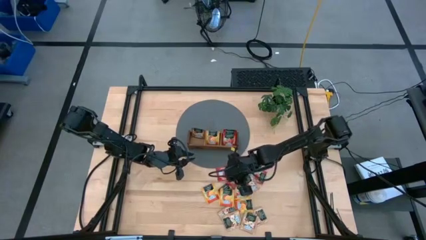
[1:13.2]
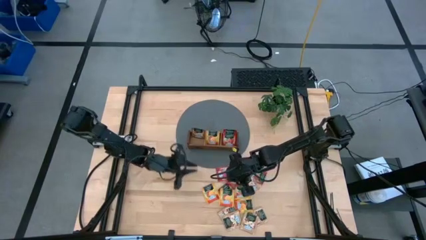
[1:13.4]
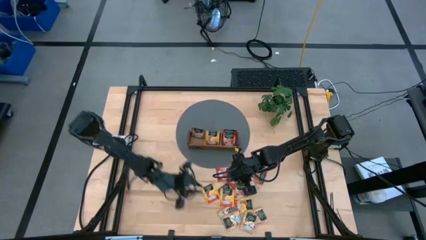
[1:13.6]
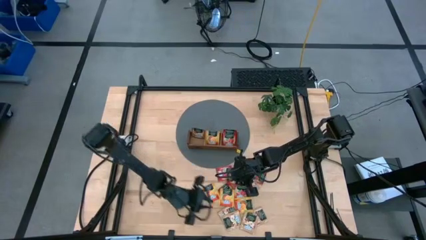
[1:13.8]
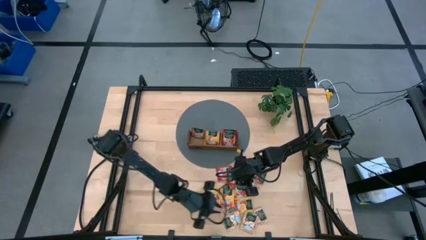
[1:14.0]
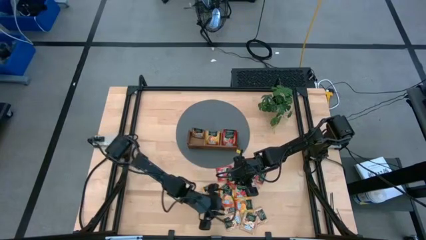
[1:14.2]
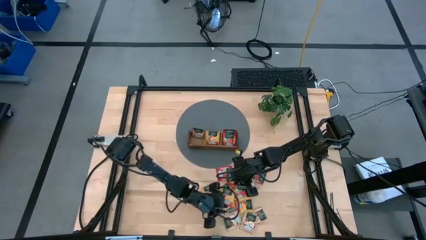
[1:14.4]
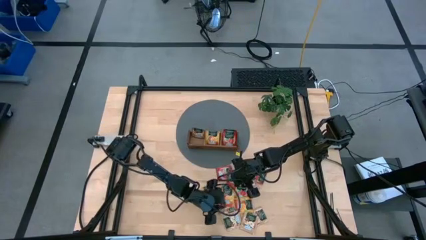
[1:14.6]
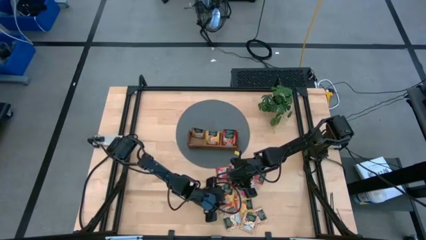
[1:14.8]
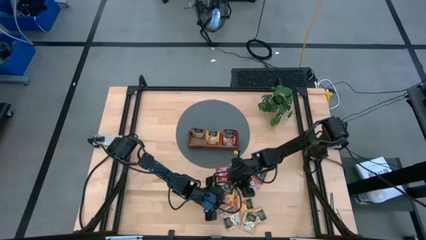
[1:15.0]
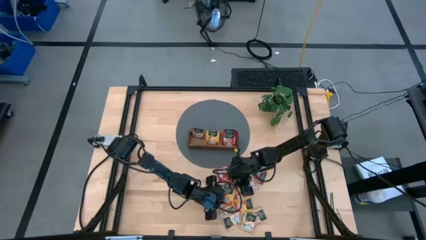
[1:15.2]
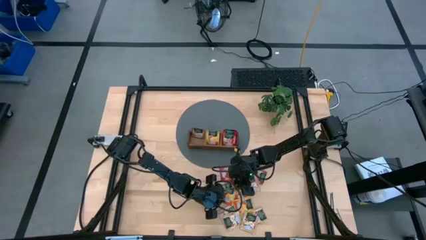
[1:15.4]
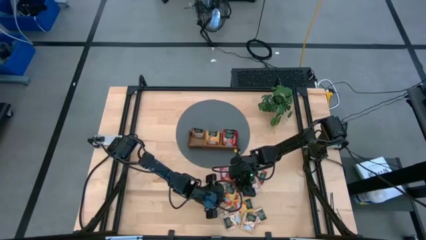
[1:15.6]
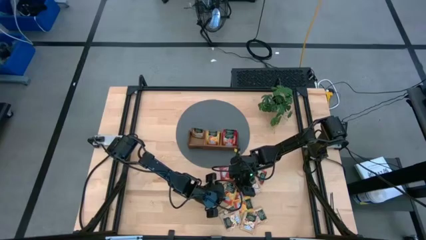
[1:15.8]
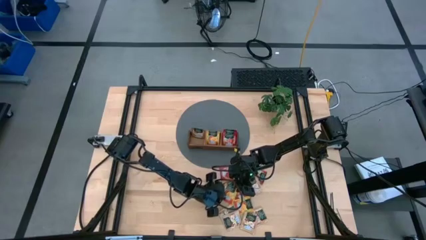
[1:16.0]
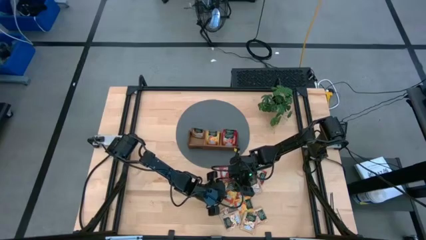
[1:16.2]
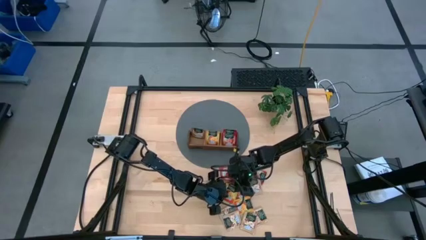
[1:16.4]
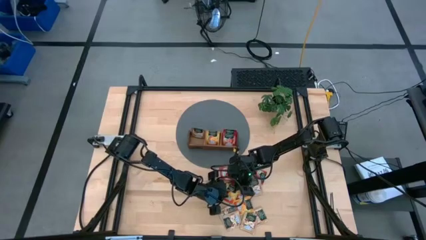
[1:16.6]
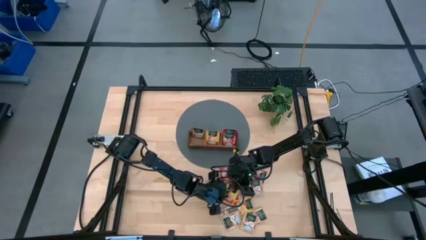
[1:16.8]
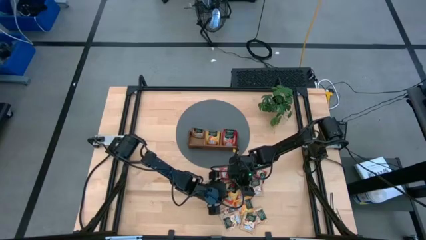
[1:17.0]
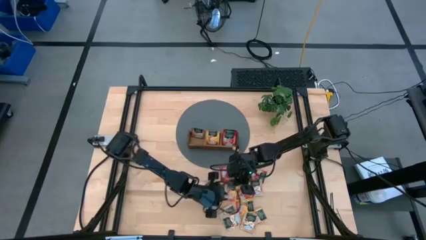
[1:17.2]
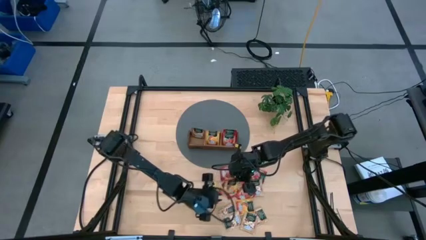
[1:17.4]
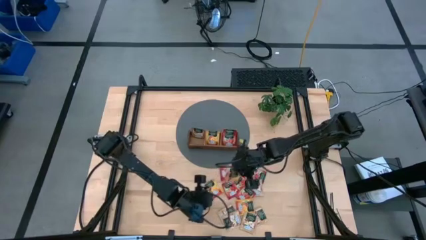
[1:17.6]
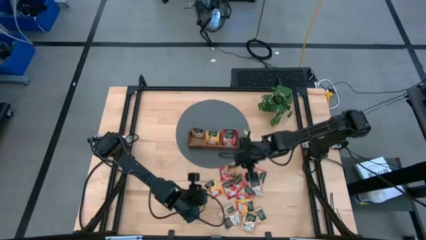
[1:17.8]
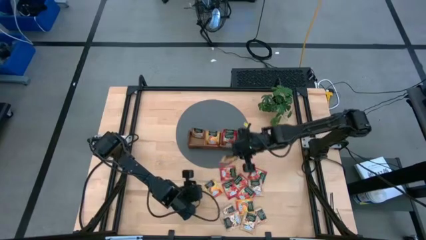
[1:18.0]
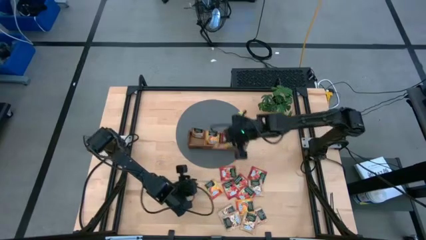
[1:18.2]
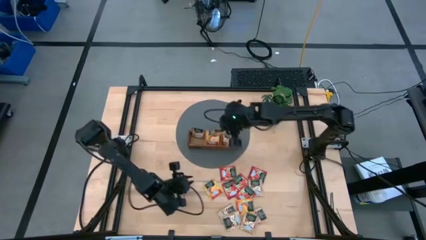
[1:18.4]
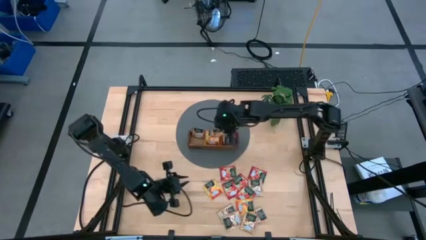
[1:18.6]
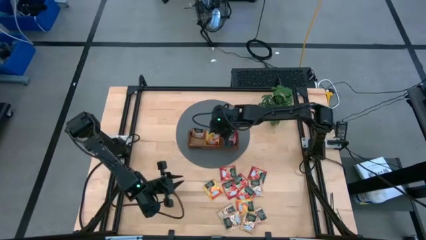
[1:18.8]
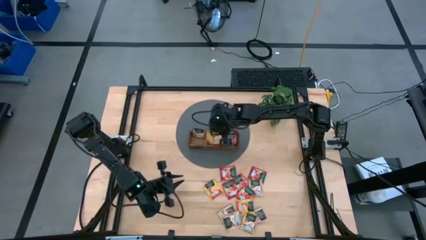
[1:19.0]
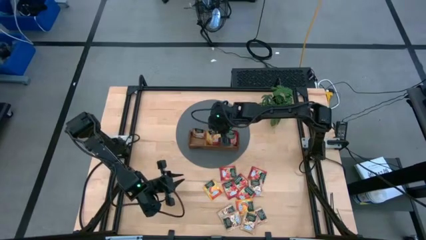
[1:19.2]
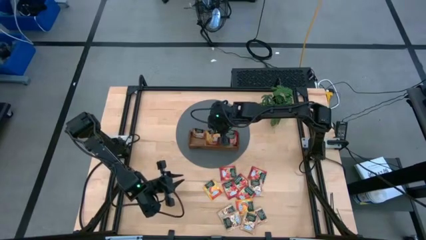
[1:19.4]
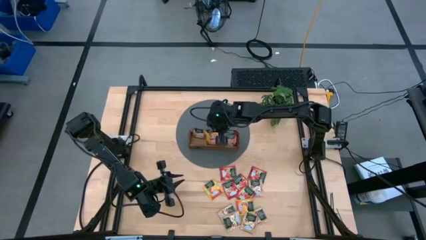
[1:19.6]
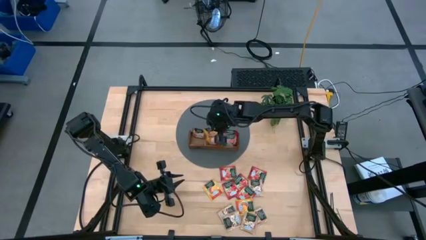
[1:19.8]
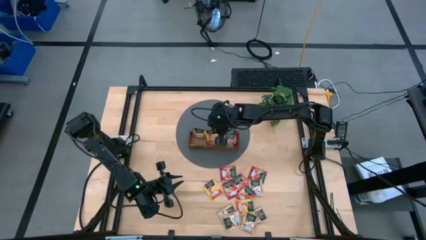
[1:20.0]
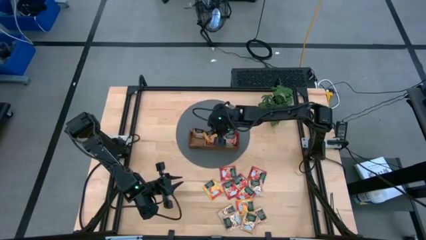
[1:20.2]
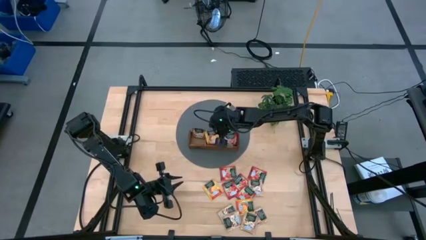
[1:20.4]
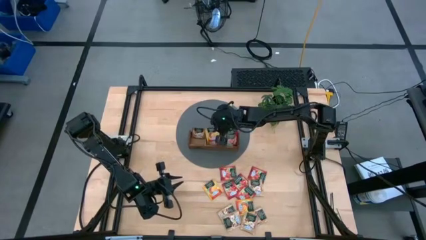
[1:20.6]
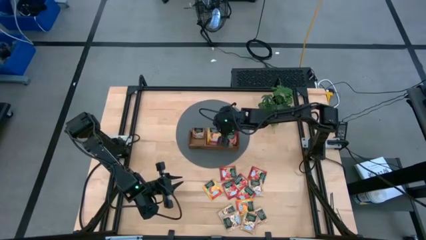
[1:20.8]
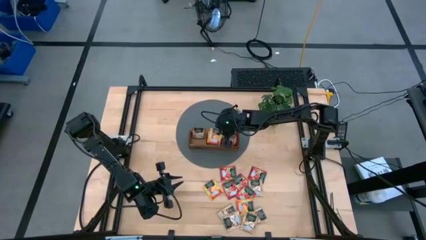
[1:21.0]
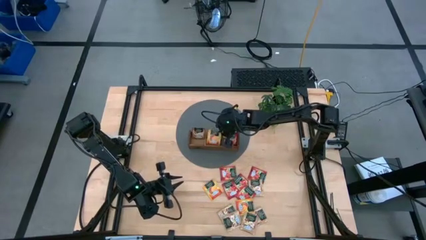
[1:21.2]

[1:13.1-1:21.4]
Task: Pick & Place Tea
Put the yellow tea bag into the middle section of the wooden organizer

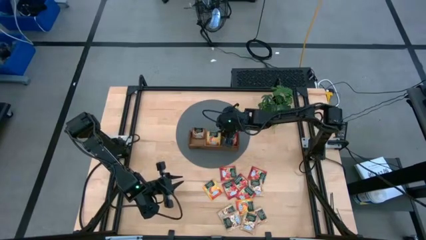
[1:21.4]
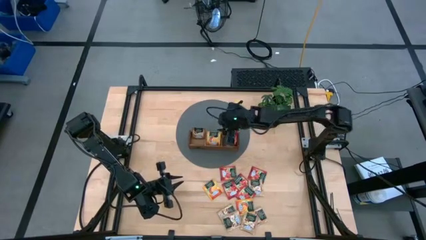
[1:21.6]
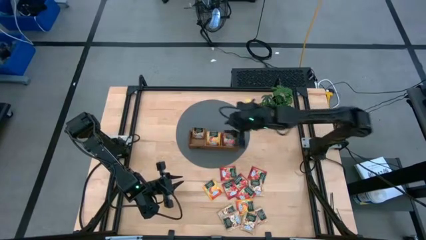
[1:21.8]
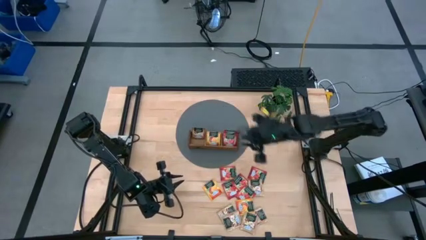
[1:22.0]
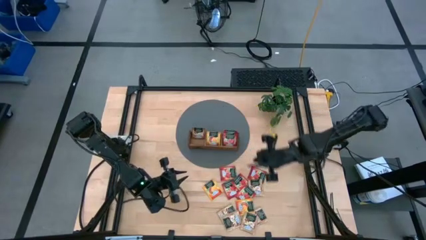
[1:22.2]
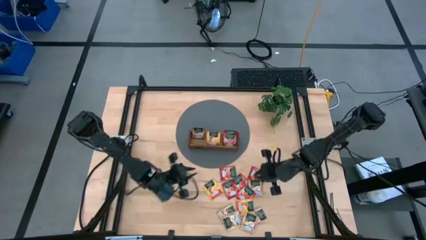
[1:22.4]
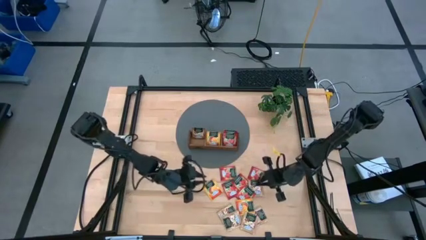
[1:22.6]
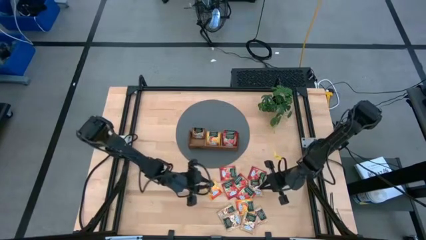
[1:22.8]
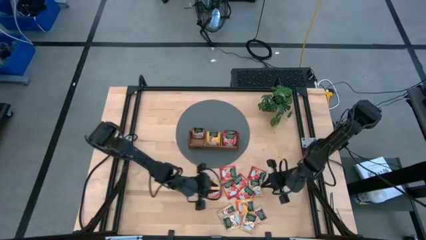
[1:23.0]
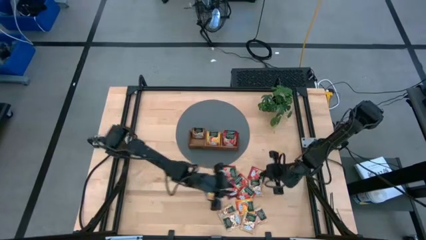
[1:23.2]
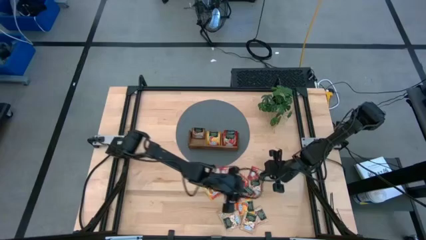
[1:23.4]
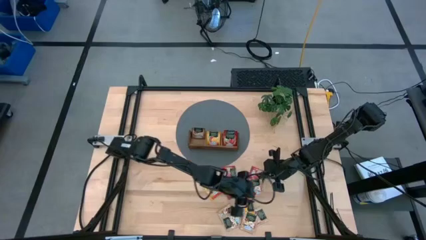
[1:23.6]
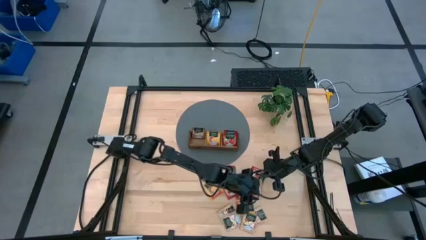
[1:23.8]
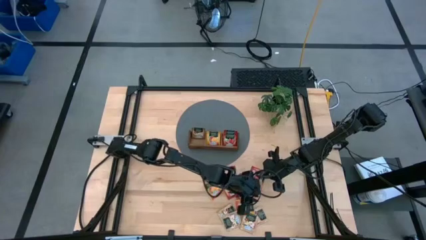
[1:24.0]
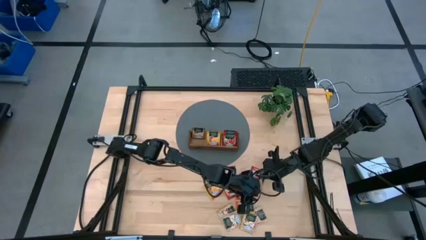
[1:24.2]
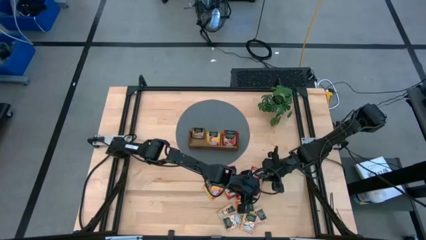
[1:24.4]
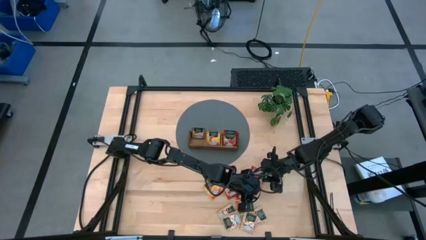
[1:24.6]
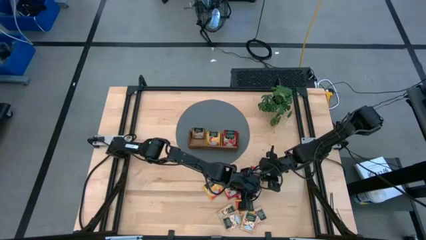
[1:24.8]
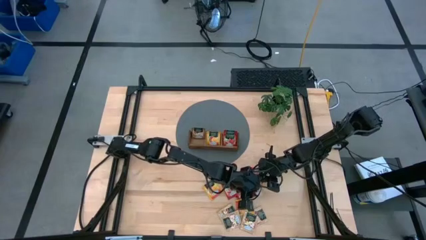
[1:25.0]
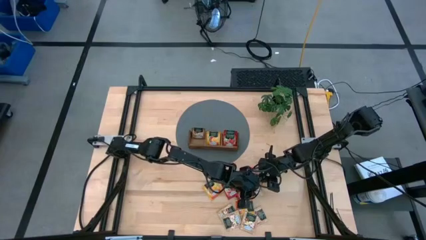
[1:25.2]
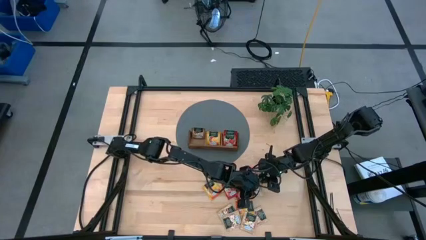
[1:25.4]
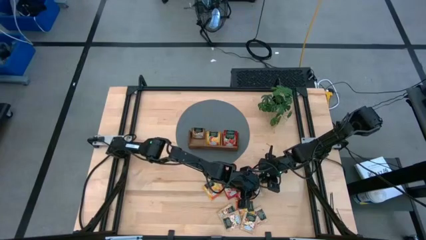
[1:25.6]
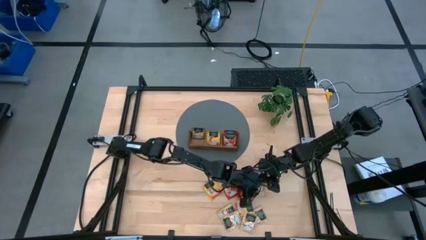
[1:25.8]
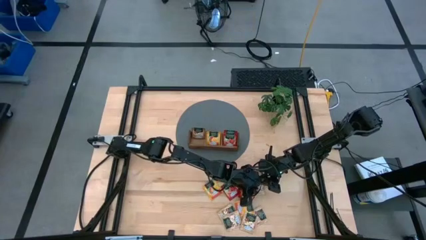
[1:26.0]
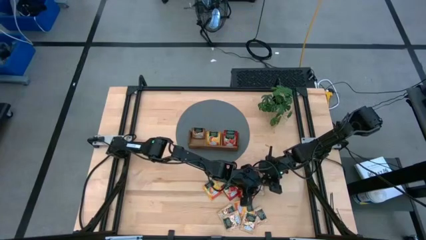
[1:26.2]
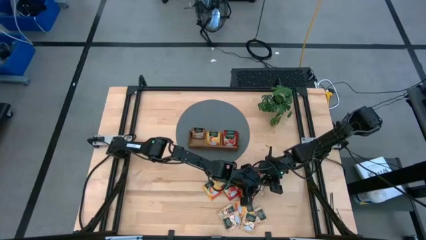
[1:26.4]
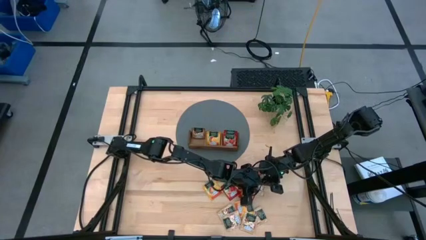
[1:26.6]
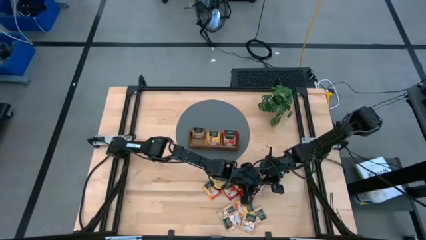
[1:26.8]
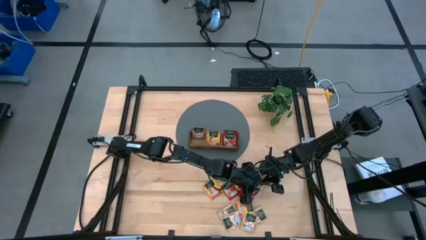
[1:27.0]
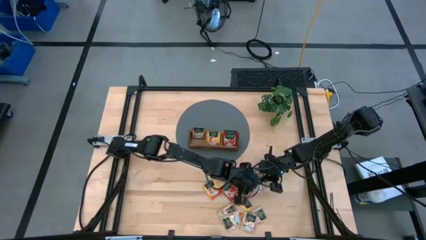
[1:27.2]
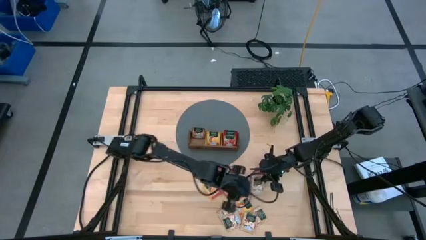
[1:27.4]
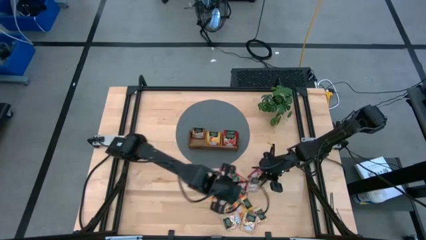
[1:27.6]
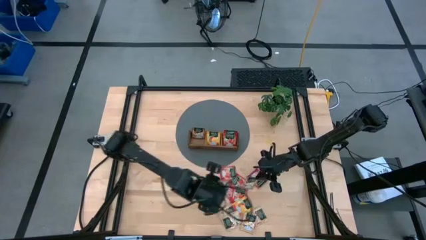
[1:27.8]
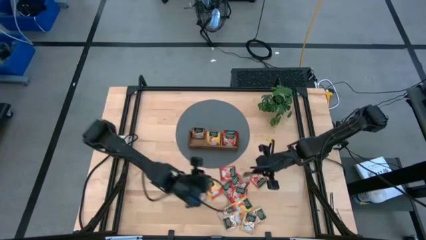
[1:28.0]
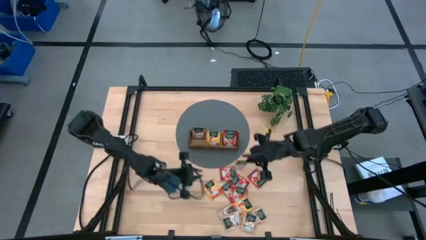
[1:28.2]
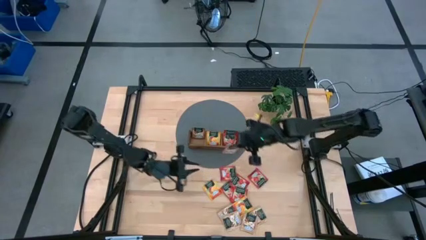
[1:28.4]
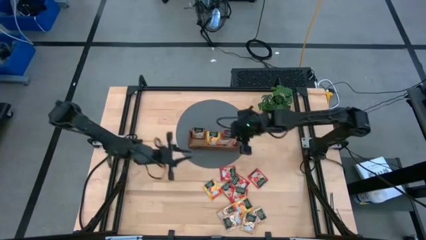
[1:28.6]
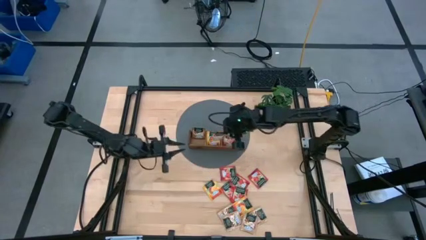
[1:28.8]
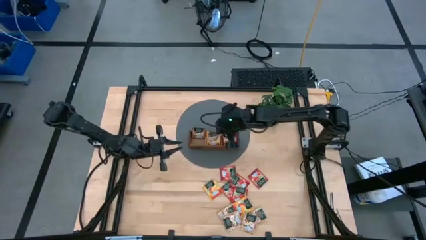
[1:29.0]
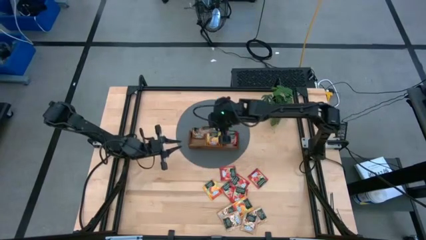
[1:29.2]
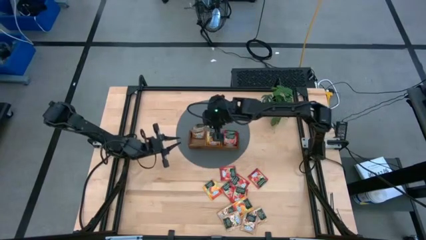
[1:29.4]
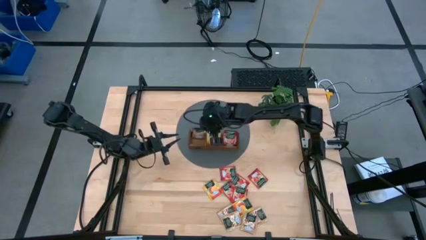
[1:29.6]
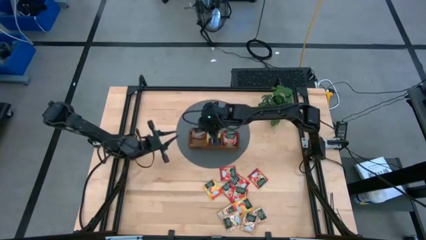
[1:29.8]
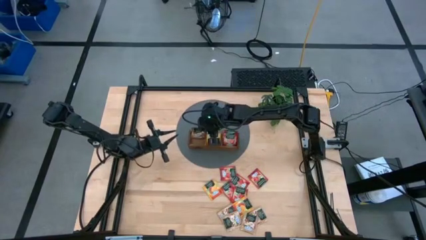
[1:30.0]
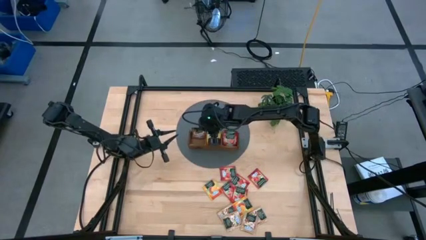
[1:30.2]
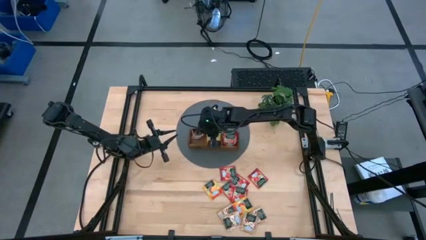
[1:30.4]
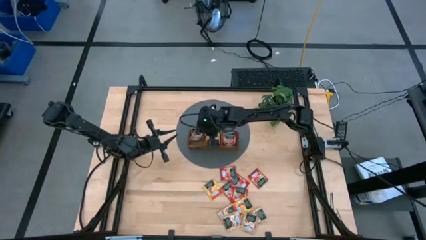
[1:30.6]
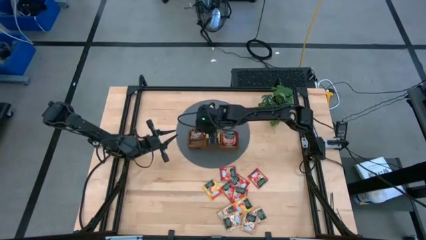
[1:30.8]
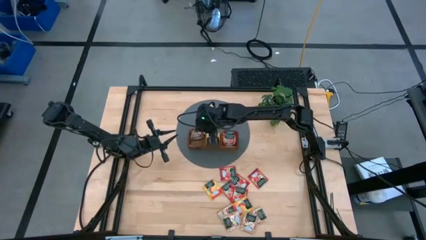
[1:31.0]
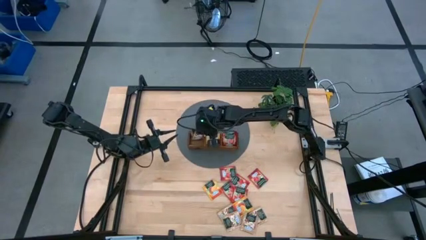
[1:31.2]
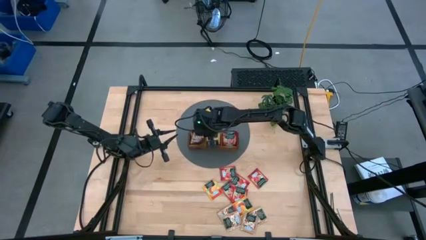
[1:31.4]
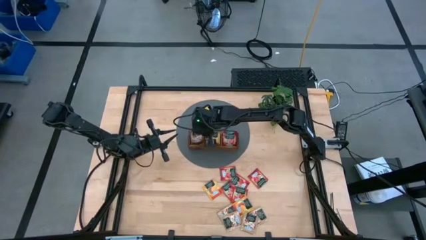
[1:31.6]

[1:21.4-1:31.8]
Put the brown tea bag into the left section of the wooden organizer
